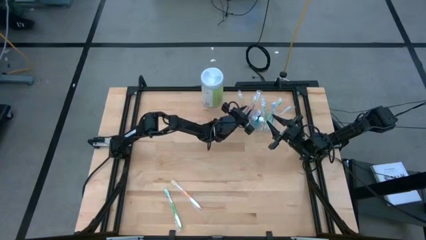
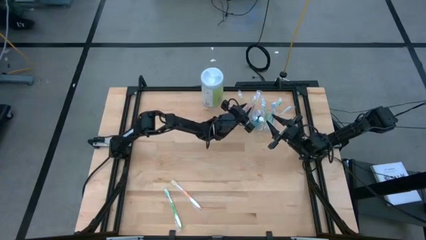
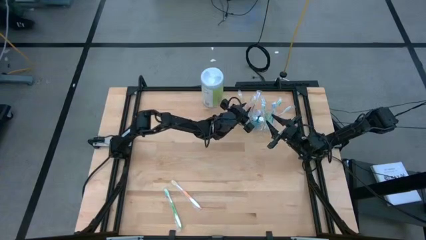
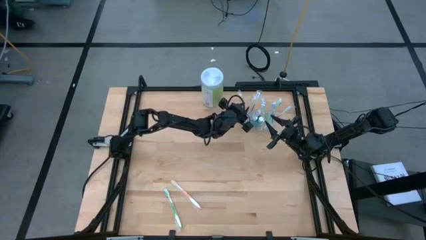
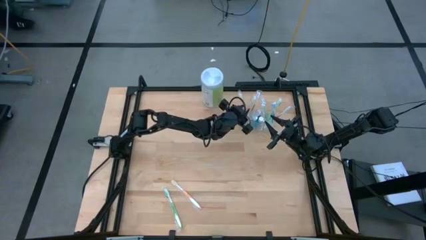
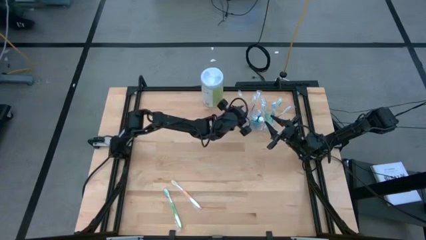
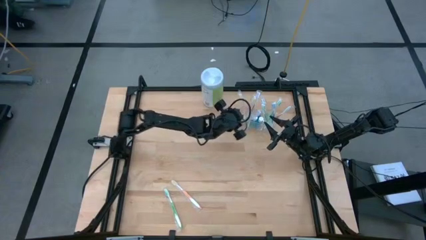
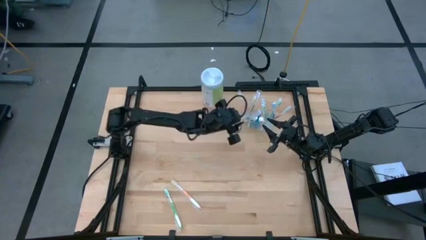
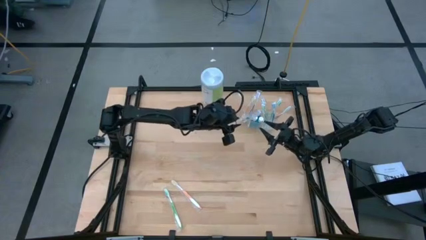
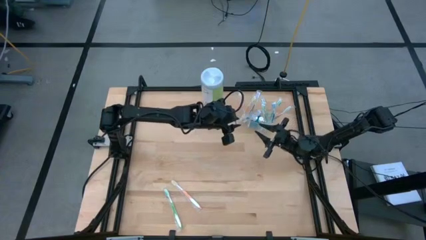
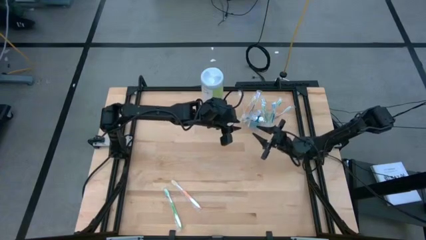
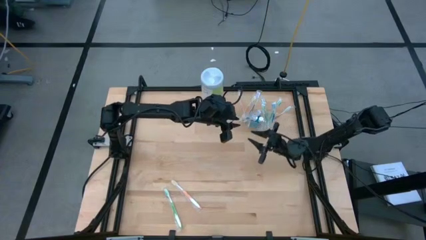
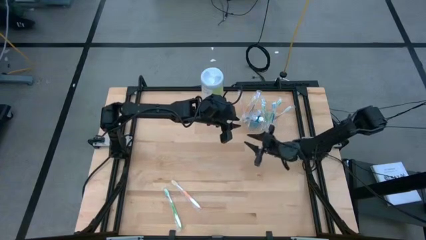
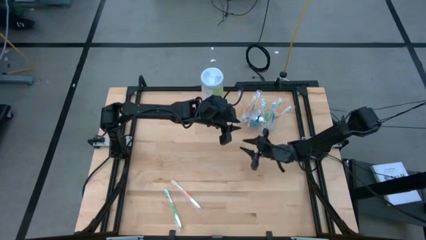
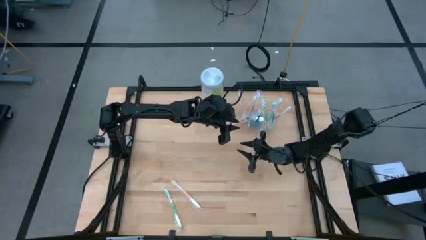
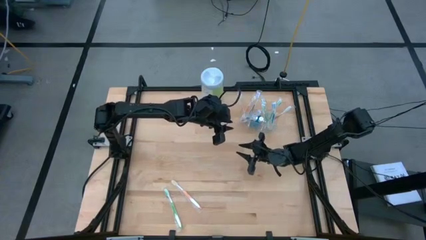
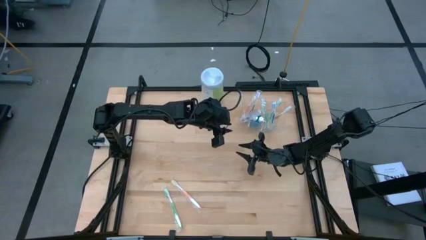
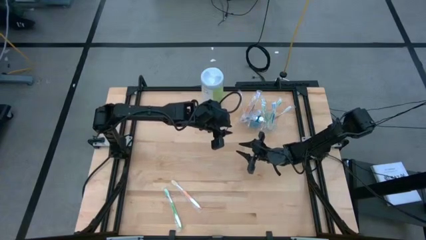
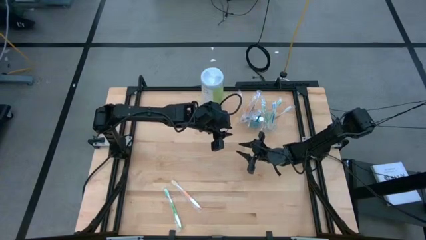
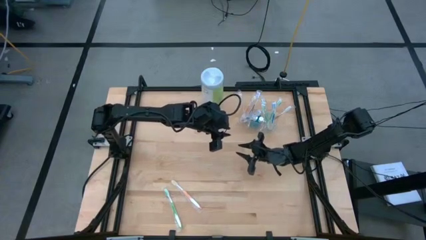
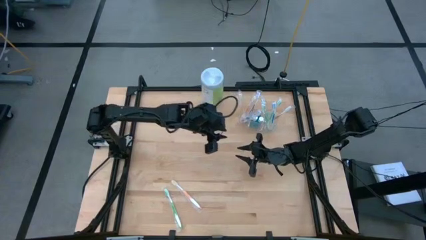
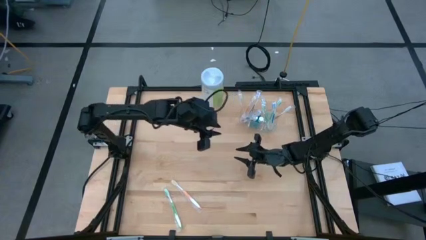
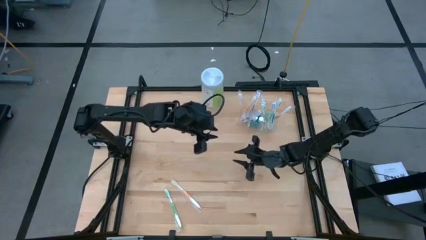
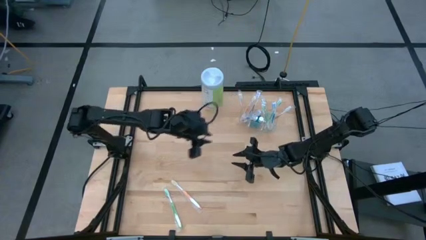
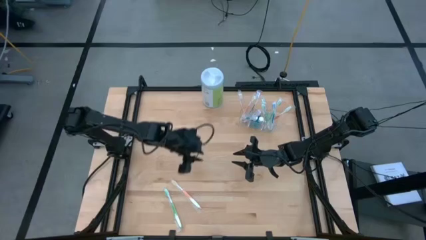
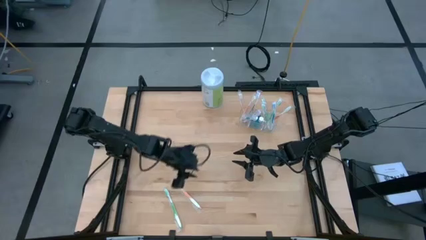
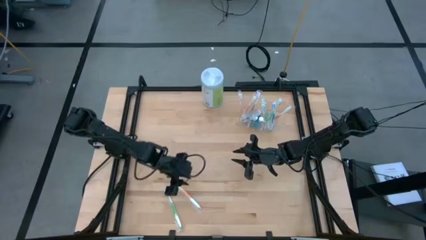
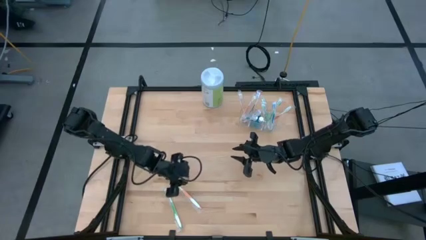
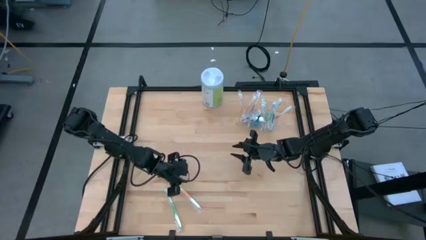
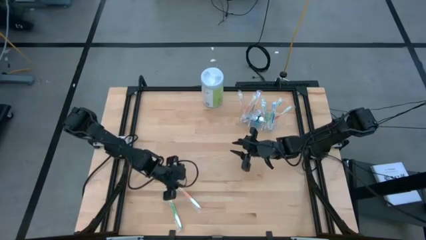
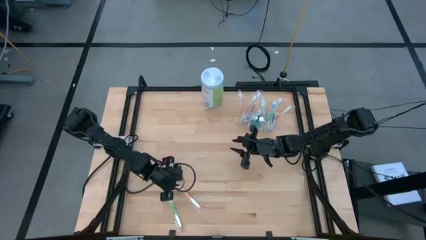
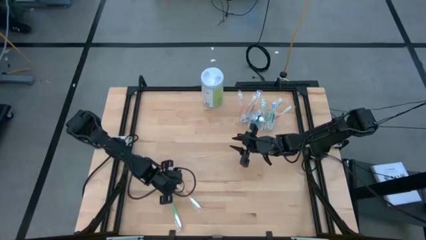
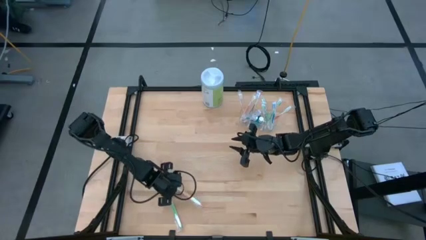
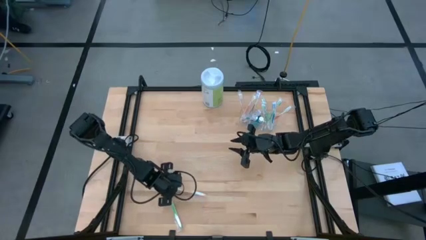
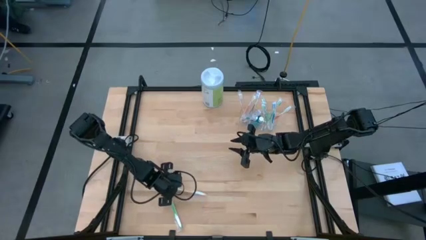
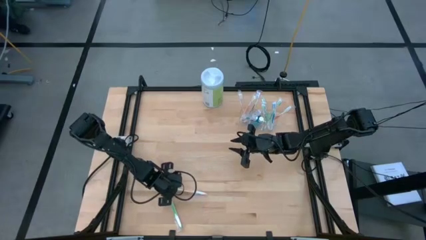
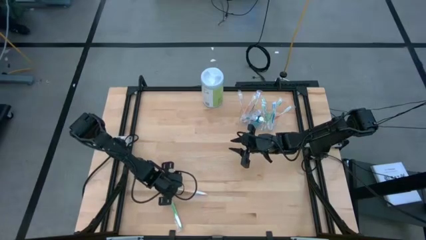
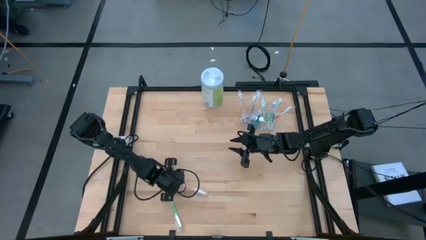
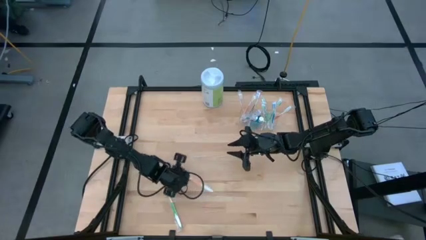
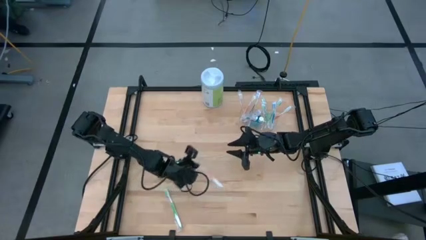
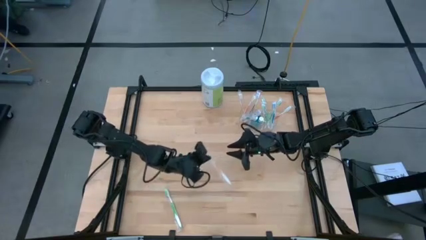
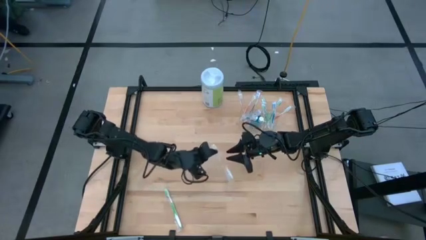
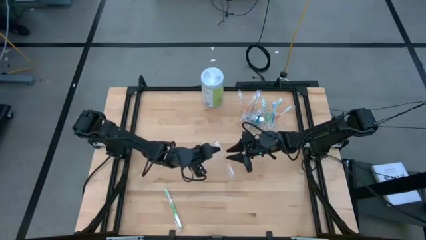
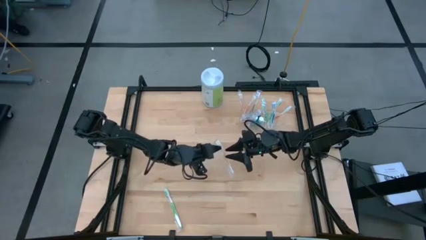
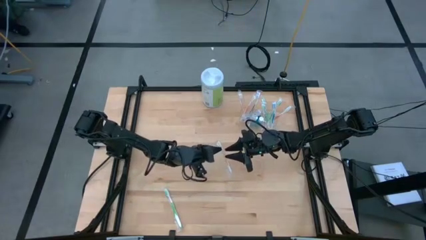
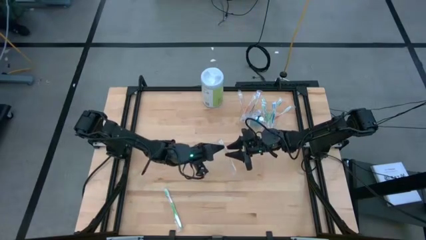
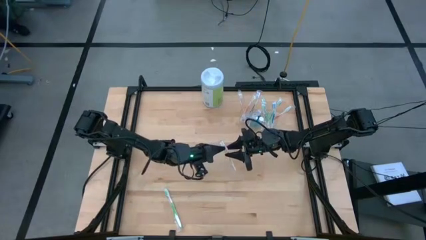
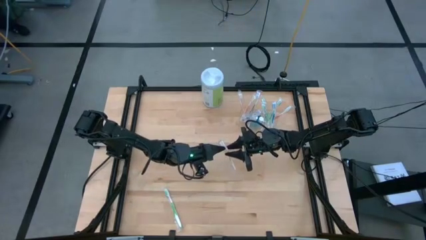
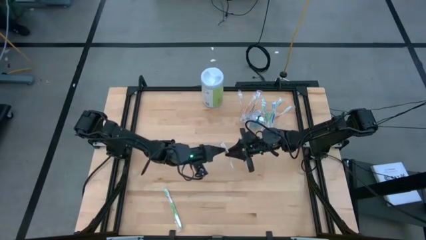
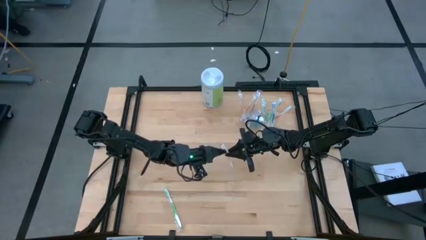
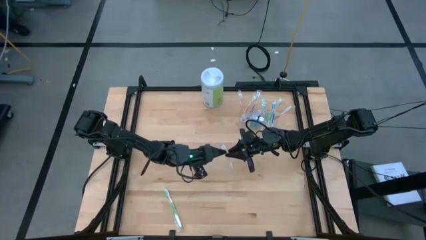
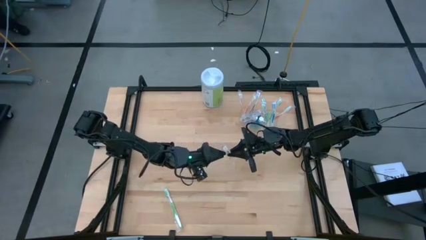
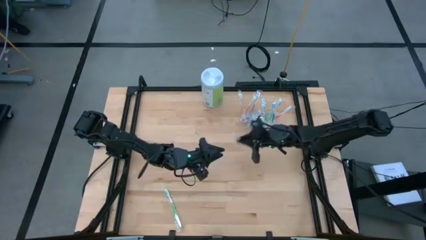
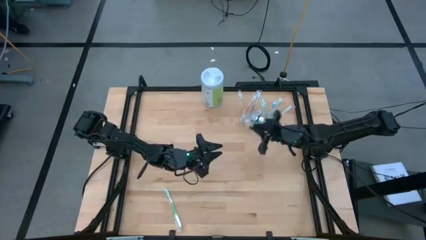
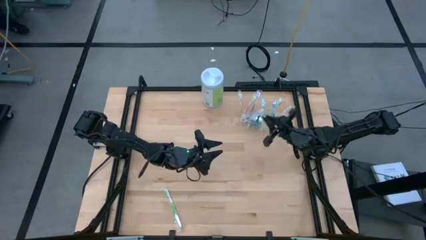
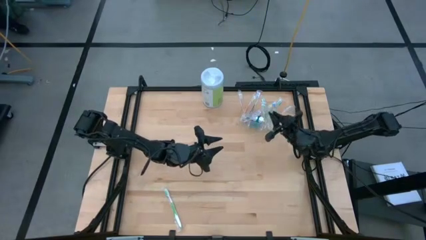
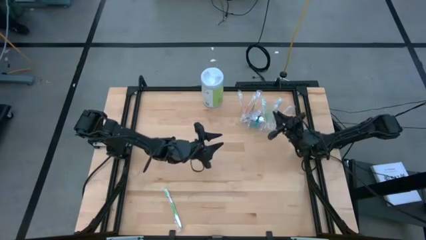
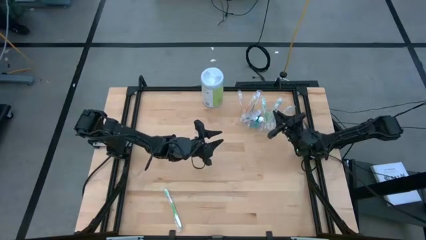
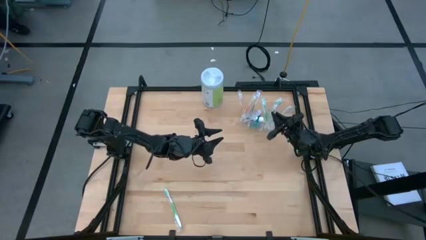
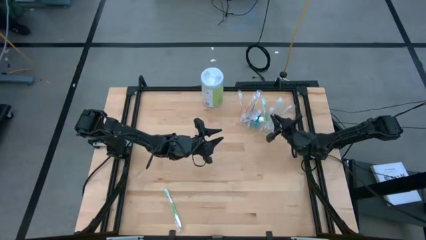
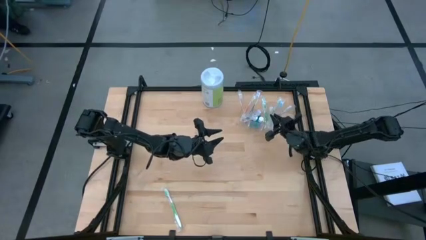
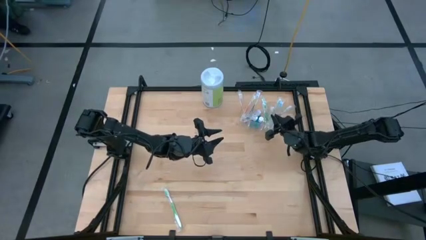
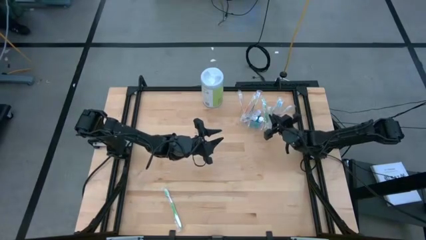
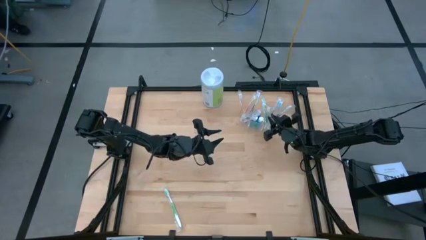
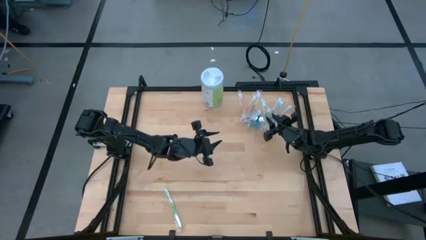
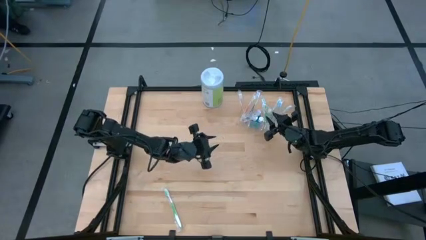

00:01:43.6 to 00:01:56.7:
Task: Pick & Place toothbrushing station
Put the orange toothbrush into the transparent organizer

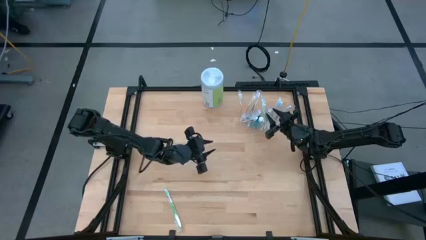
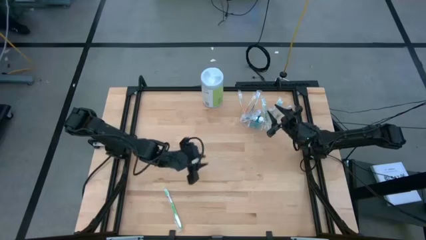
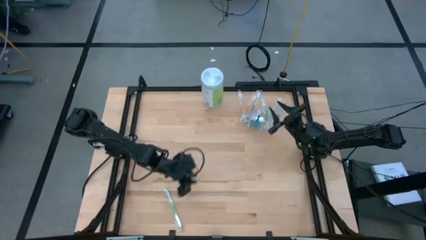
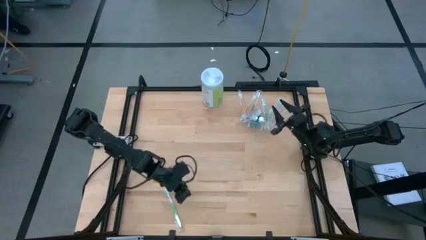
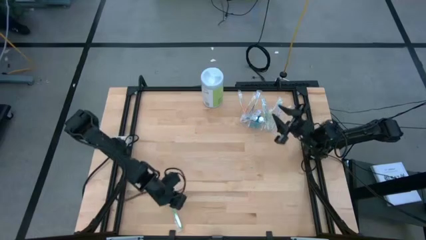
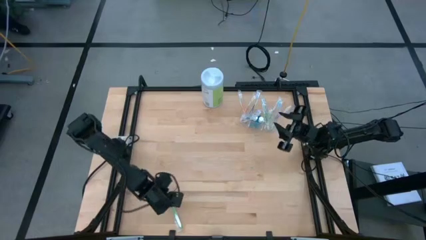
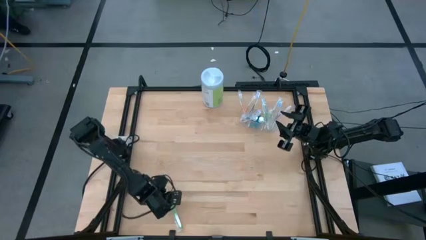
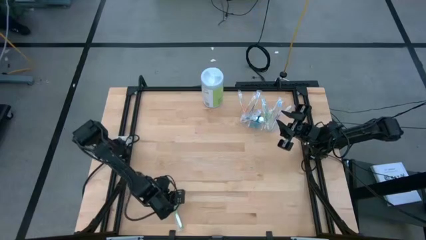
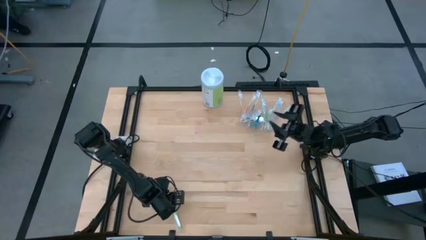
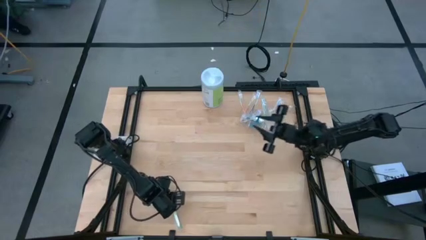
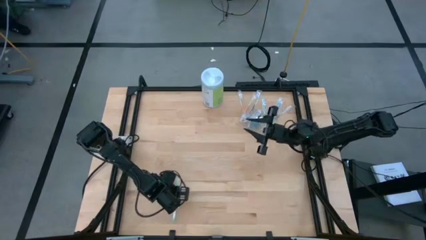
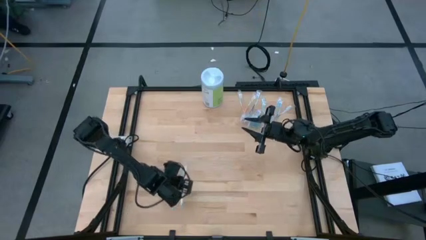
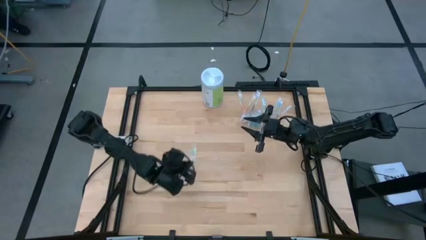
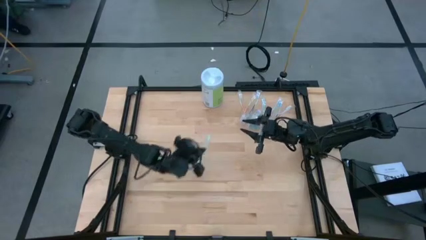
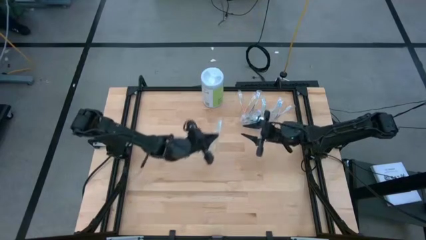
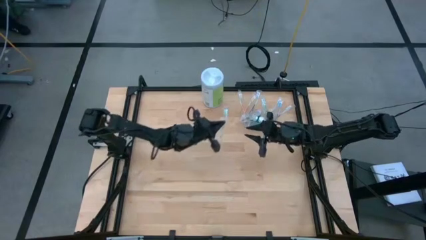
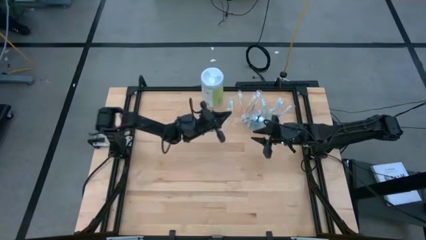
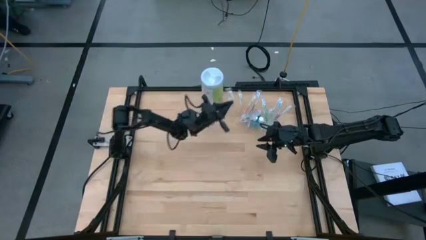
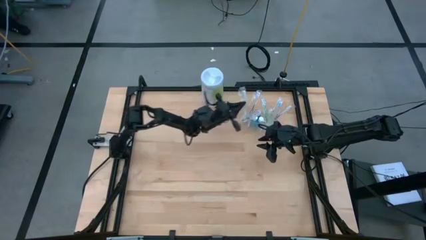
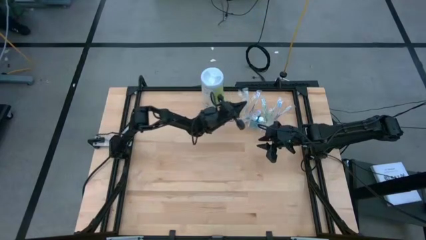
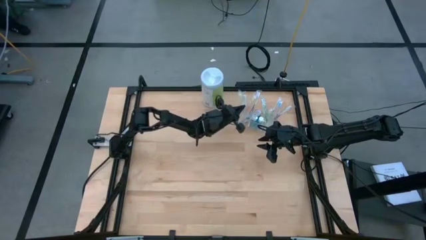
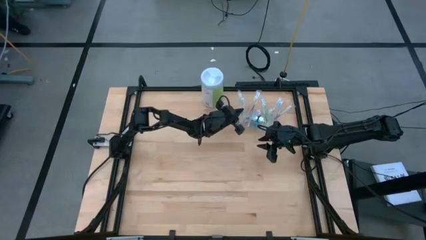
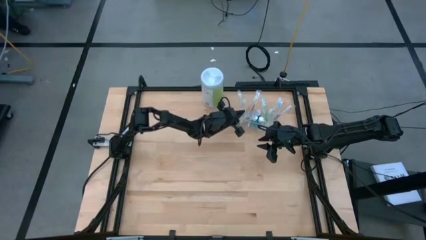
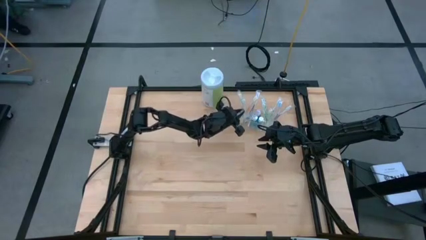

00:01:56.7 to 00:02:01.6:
Put the green toothbrush into the transparent organizer
